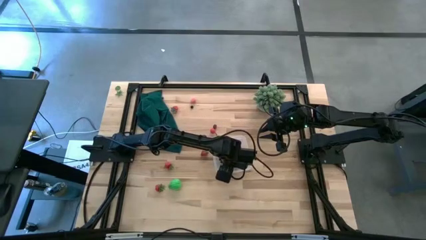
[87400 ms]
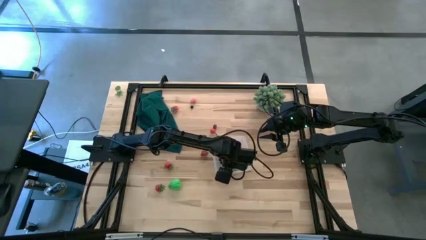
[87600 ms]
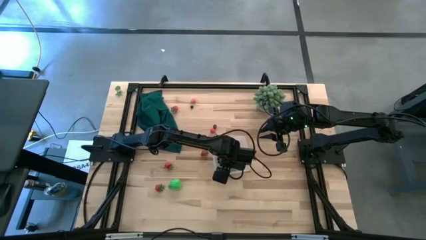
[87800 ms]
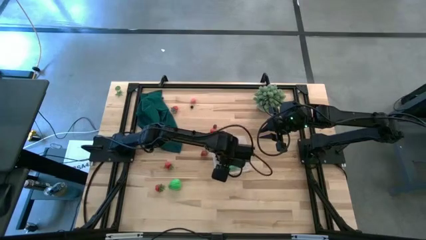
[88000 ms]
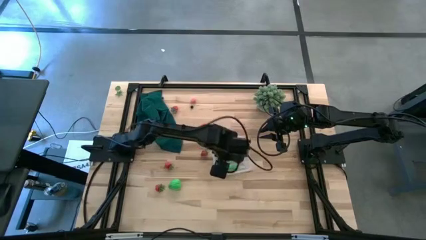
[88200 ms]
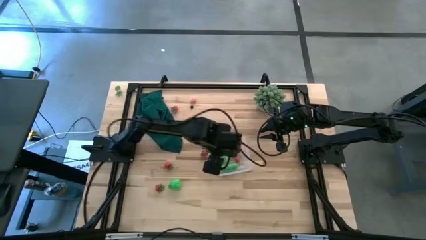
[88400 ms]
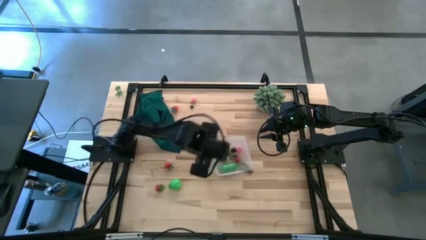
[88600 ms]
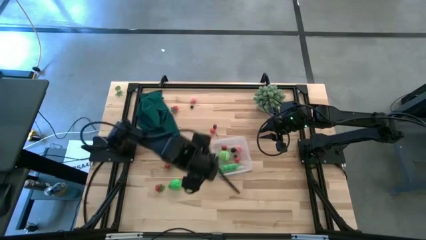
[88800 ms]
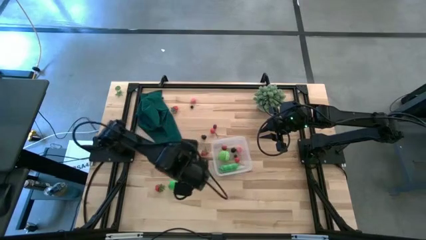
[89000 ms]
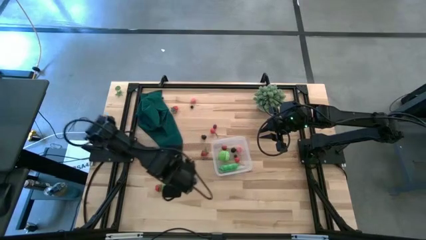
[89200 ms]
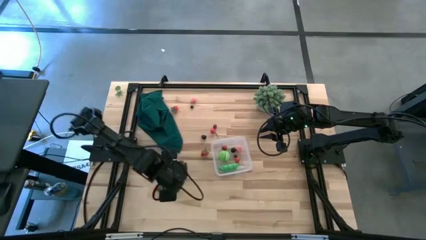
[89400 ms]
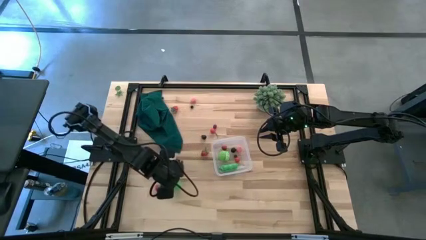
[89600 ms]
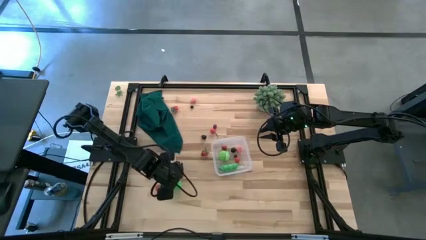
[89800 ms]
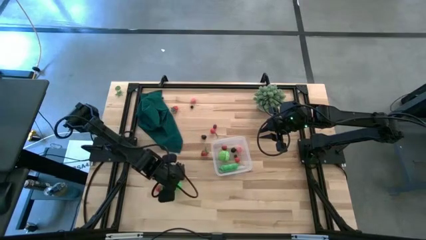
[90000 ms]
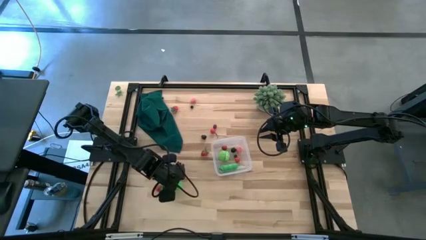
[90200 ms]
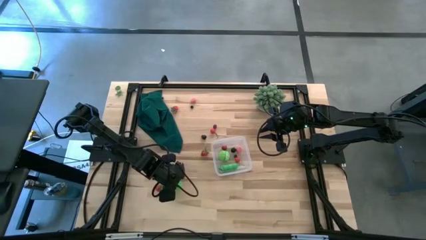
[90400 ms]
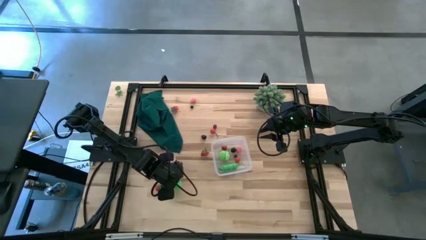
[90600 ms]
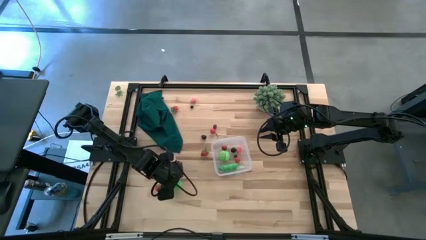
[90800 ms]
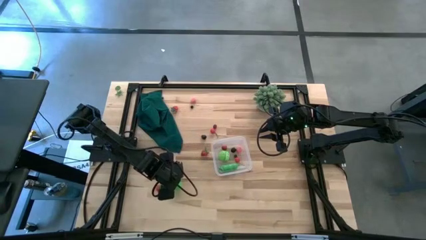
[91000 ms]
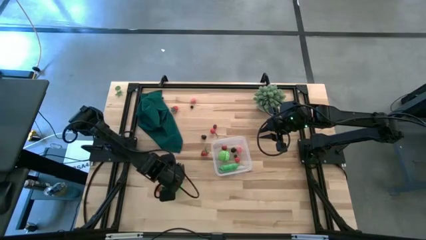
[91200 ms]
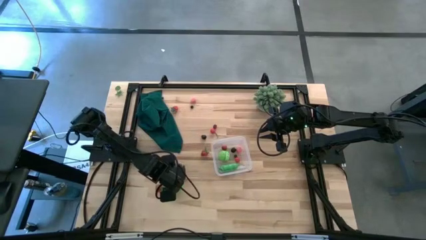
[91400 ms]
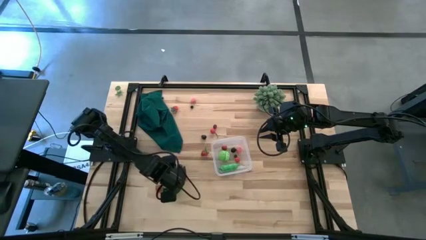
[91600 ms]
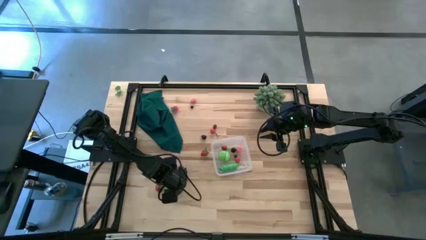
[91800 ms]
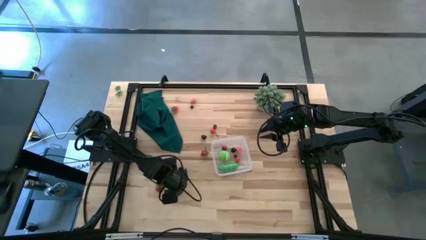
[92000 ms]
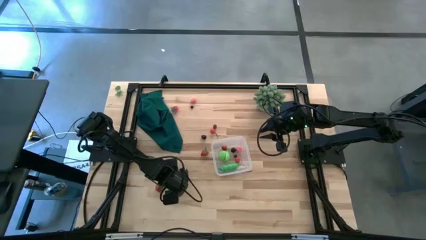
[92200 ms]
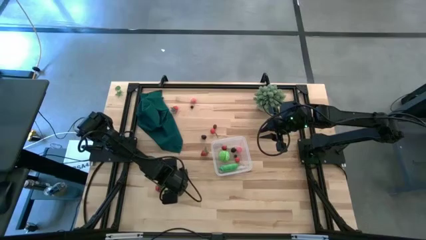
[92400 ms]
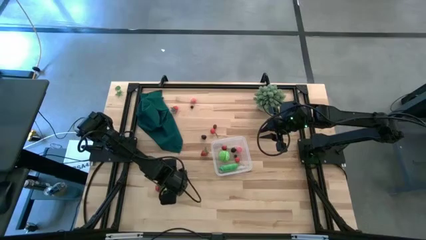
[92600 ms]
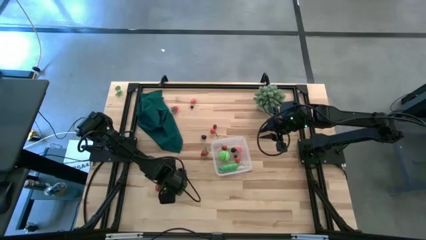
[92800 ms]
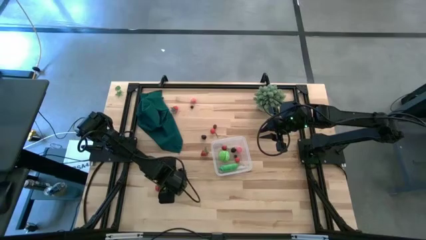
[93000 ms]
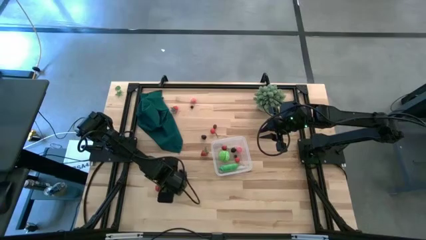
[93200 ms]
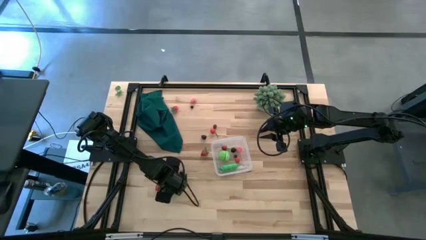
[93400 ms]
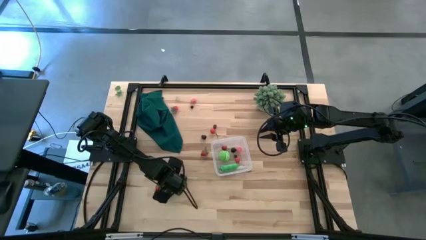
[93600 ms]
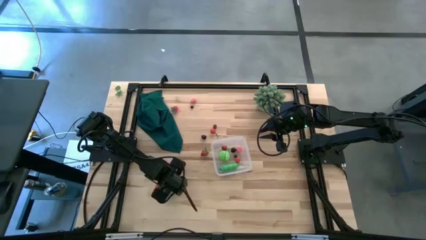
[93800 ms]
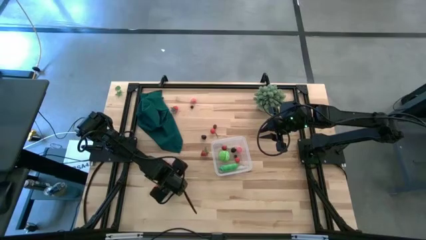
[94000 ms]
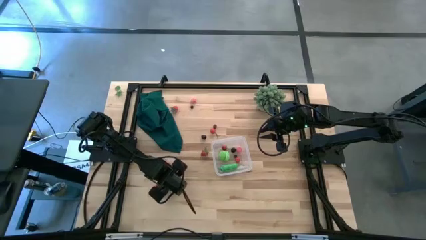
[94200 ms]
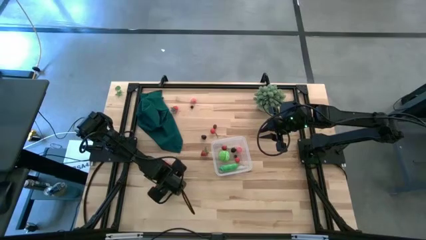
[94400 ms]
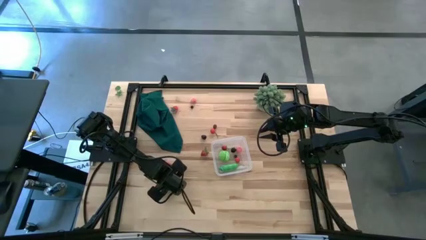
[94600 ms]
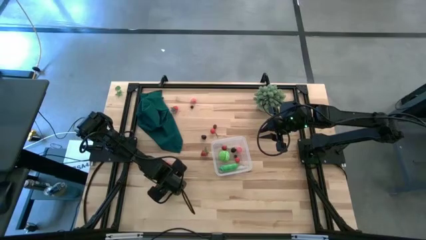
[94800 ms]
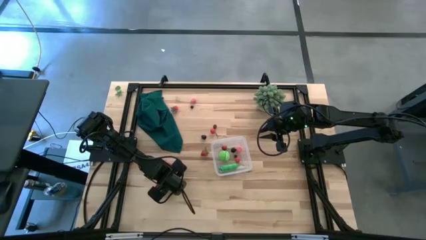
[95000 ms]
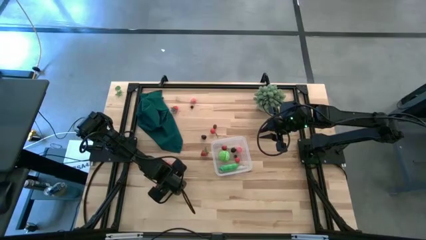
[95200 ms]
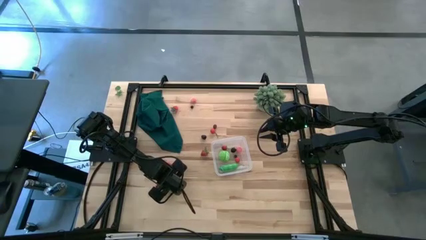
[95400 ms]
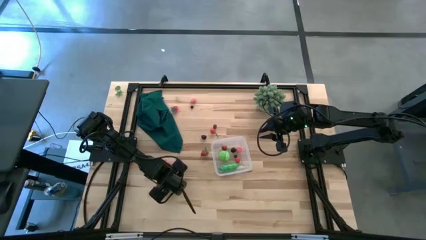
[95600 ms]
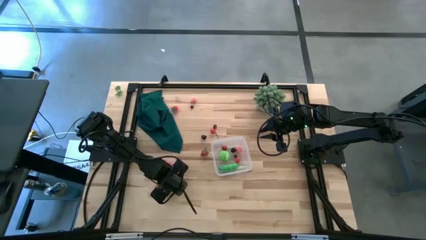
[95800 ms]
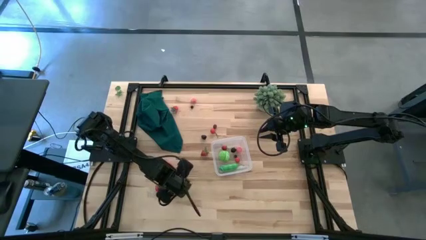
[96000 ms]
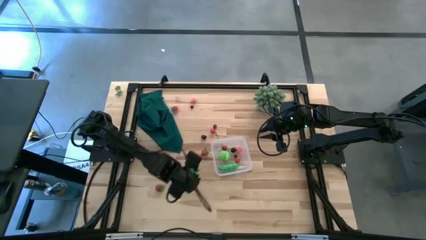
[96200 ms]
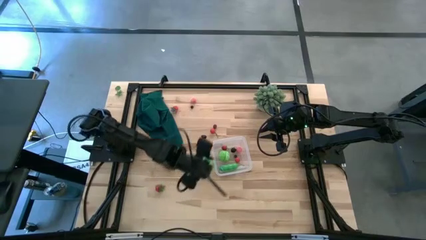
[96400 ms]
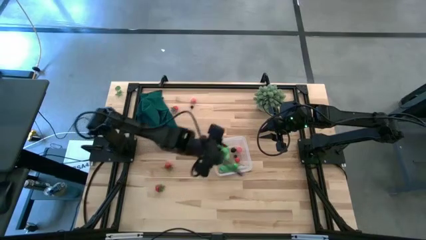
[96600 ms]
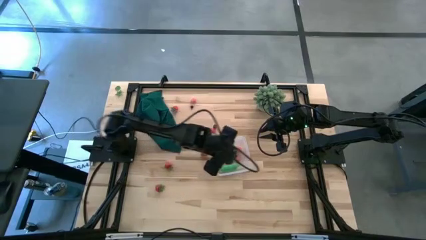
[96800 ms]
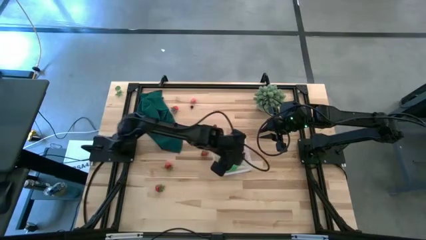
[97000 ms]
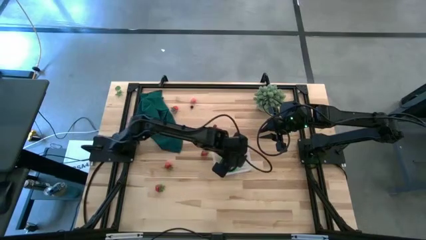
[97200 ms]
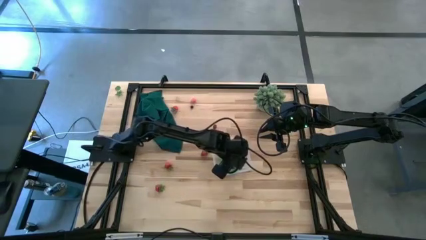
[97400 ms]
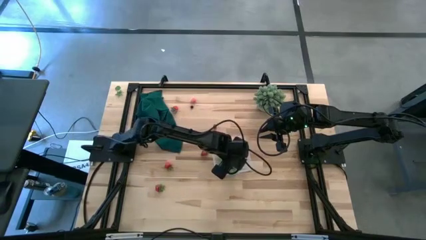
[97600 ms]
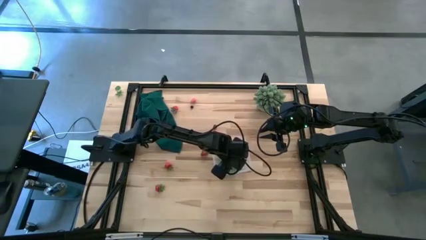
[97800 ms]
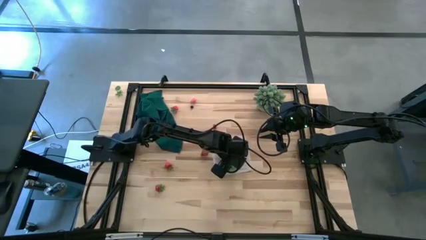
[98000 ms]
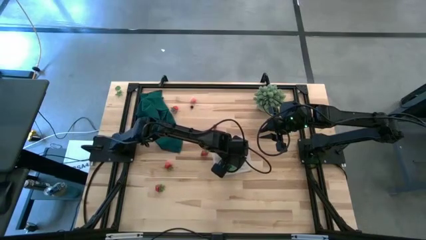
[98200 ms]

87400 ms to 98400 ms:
Task: Pick and placing Produce into tupperware
Put the green pear into the container

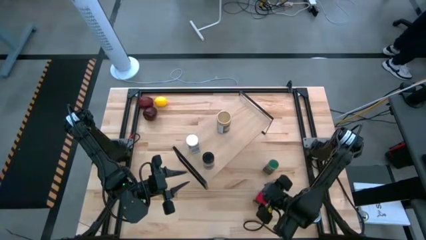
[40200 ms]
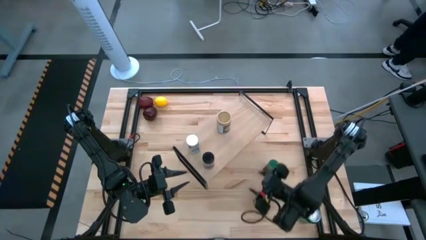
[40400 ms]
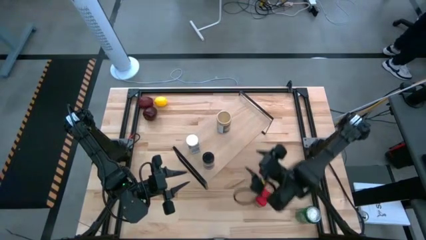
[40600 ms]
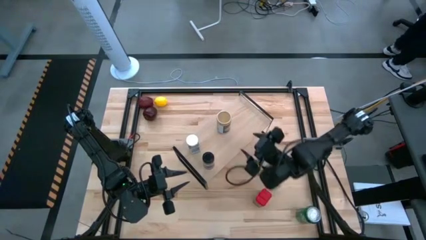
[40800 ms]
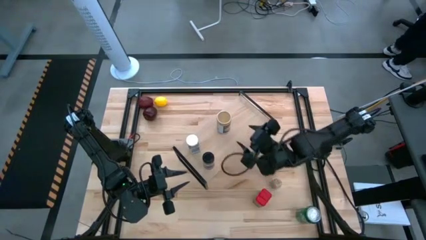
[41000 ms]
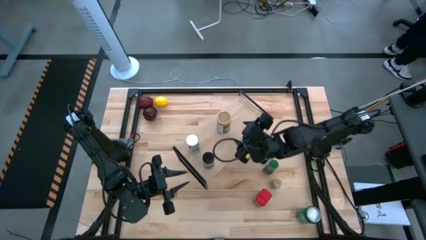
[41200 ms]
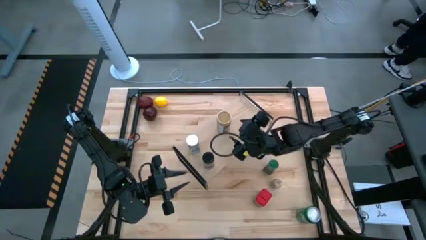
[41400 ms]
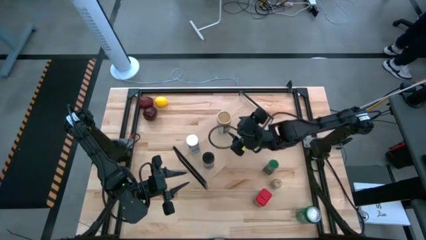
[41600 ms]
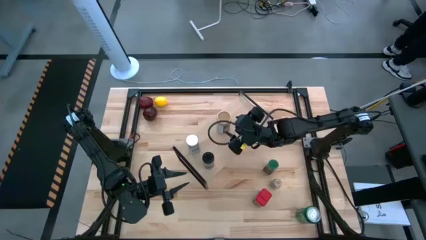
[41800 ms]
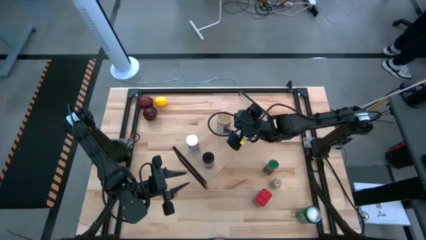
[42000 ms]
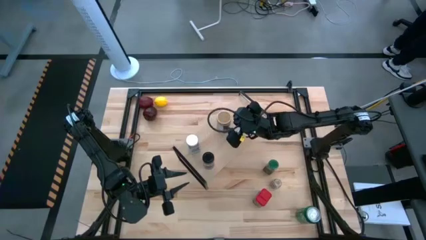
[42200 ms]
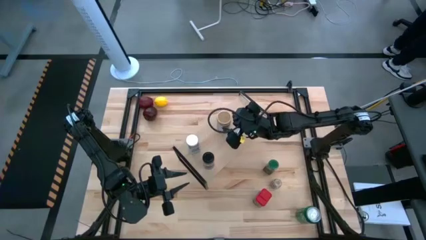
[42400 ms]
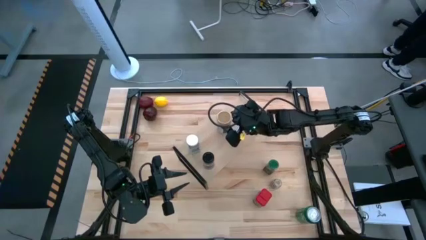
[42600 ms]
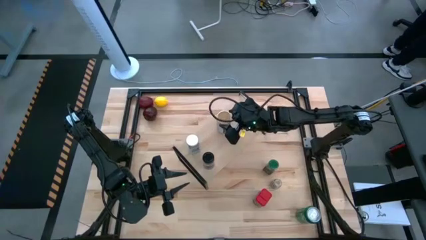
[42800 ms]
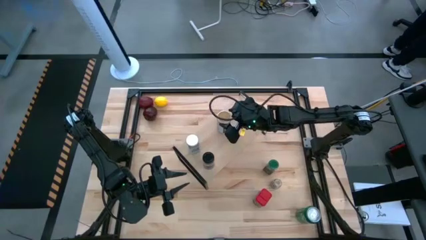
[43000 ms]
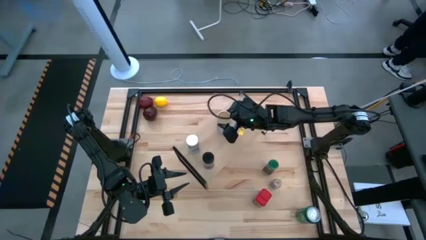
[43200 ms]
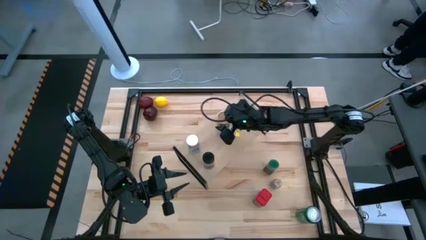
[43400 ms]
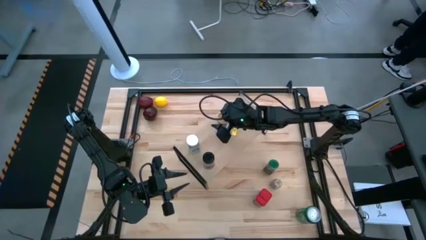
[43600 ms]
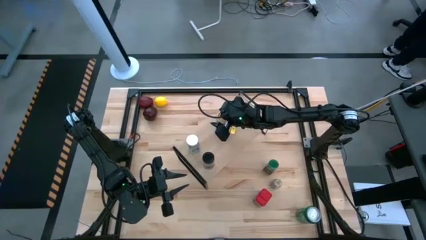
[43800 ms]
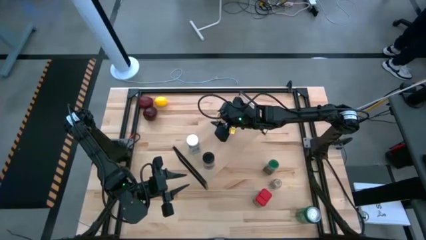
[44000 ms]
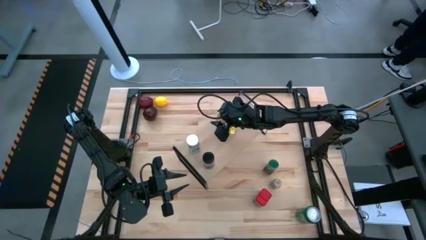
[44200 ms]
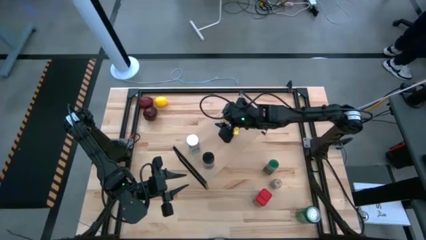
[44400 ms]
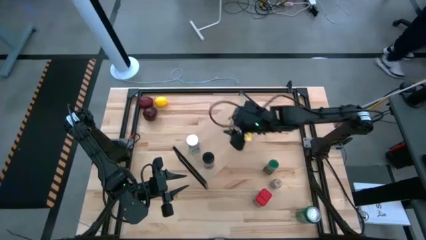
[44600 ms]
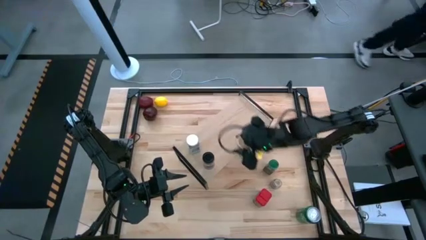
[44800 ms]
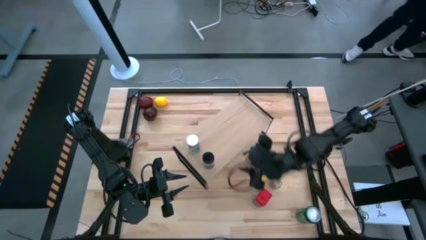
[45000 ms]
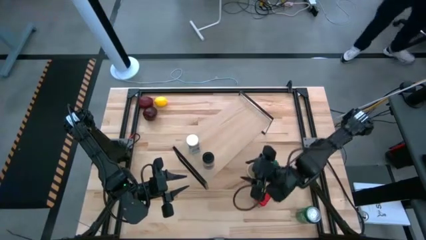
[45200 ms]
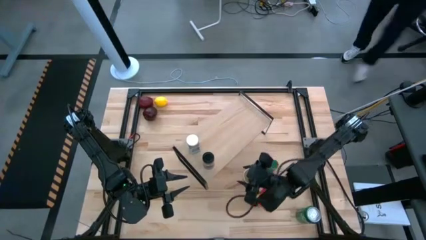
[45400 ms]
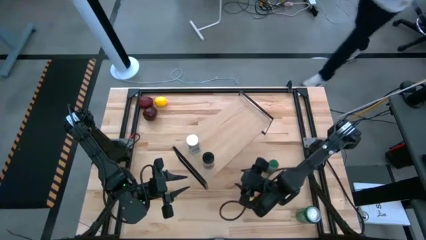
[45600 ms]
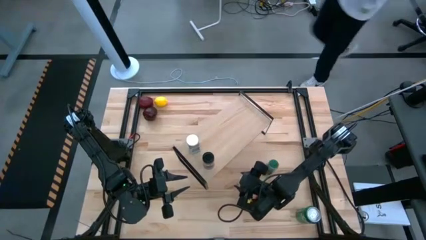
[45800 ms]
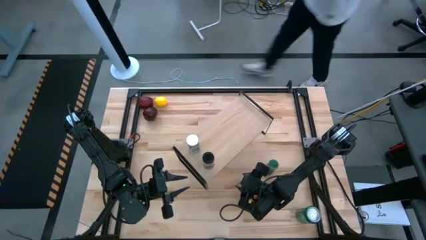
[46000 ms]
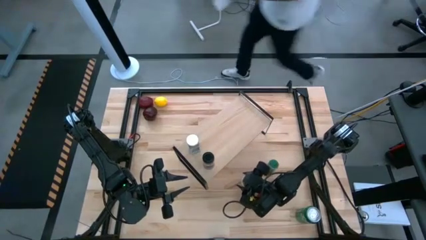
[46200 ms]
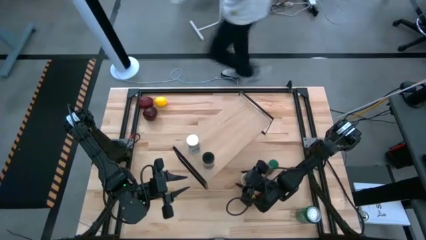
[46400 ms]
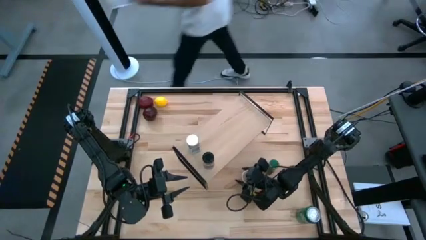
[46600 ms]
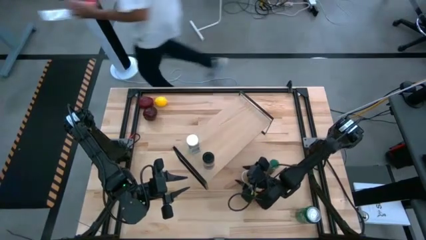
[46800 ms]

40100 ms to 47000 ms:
Task: Shelf spices
Remove the gold seasoning bottle from the shelf
